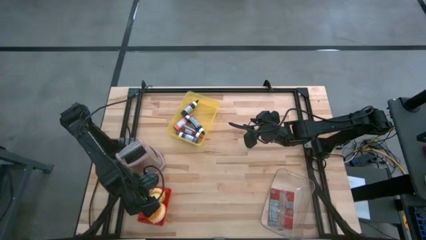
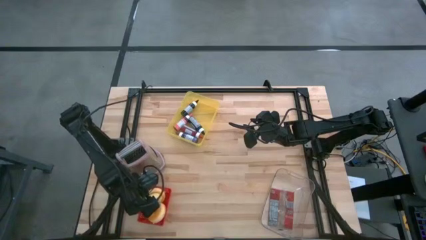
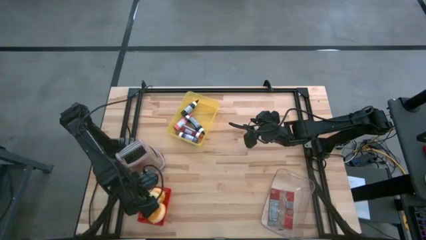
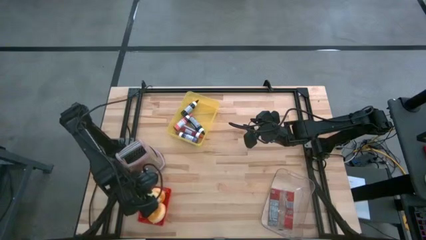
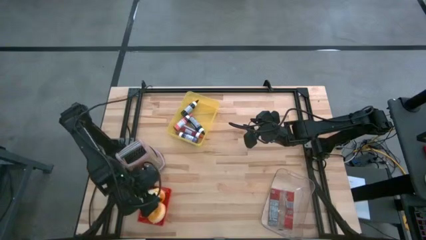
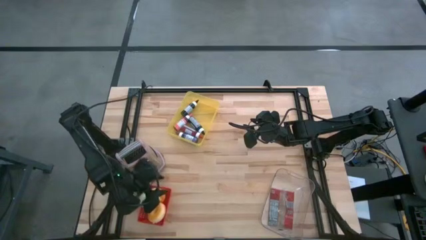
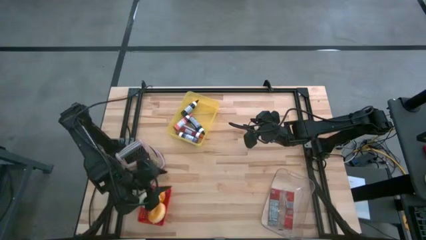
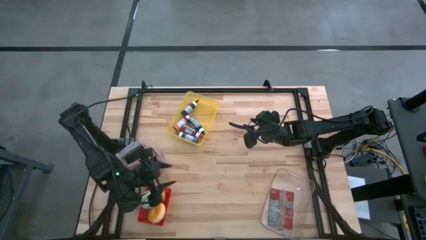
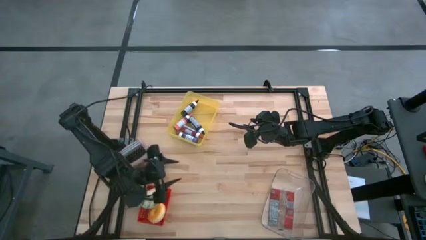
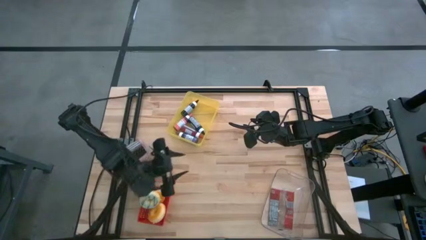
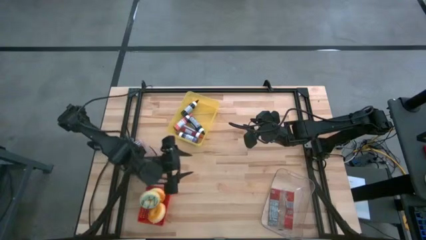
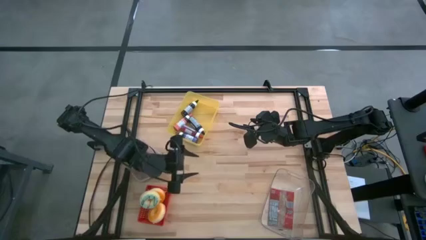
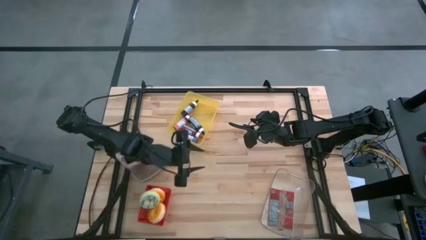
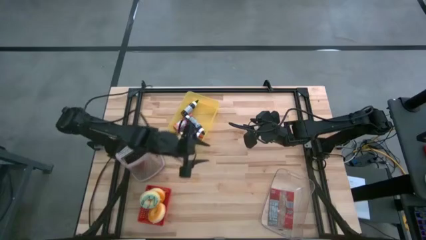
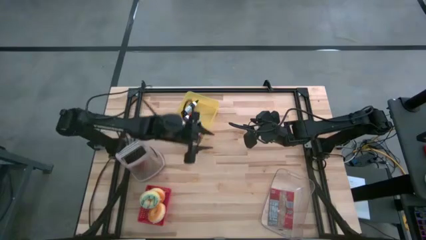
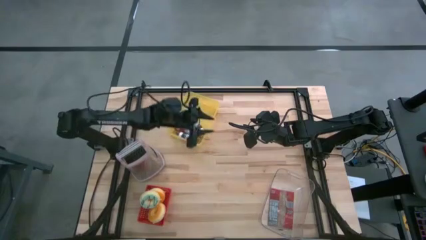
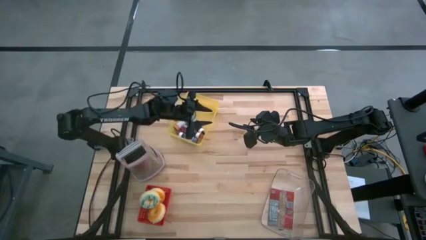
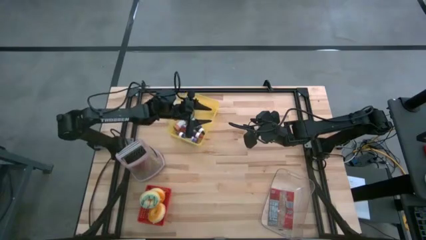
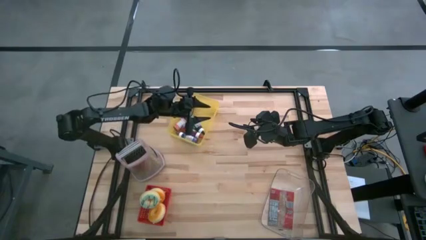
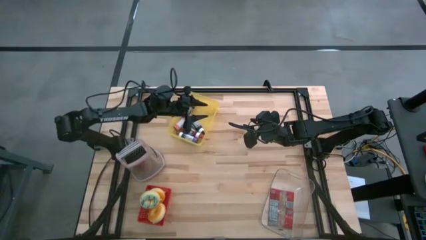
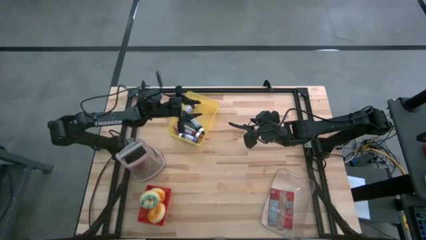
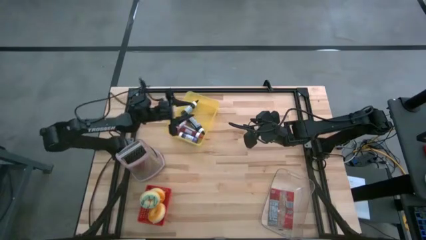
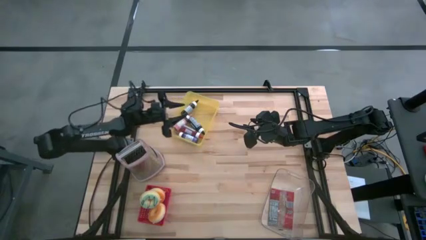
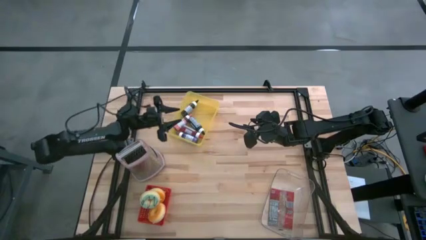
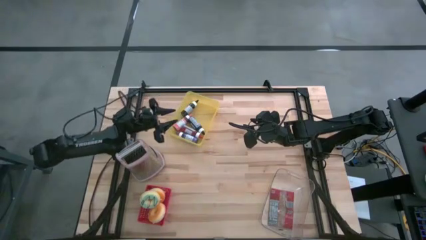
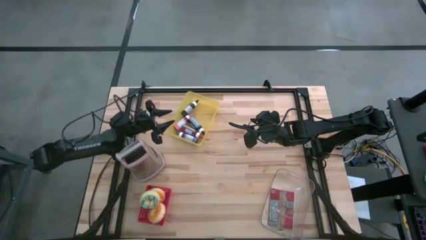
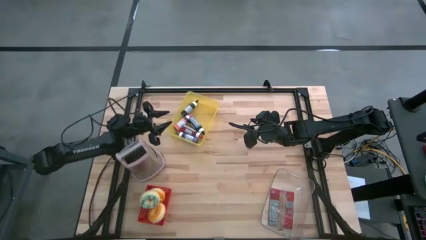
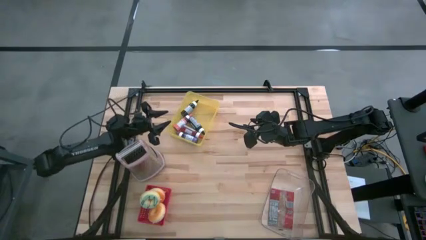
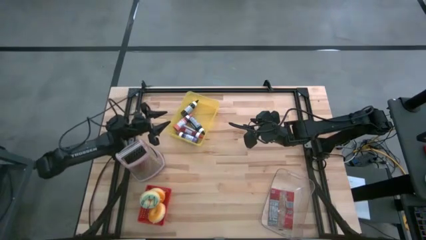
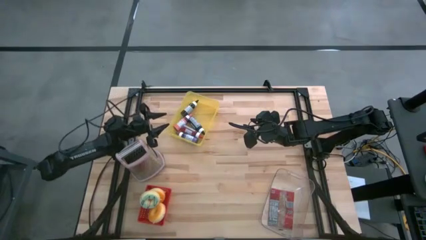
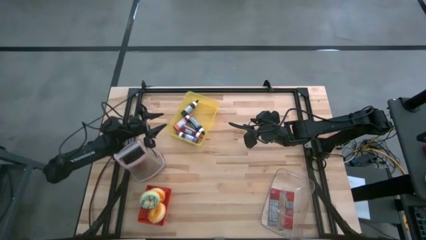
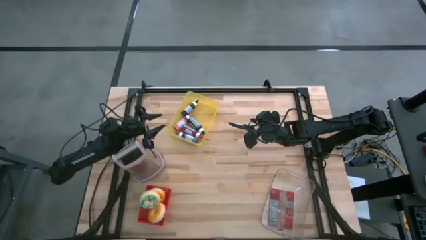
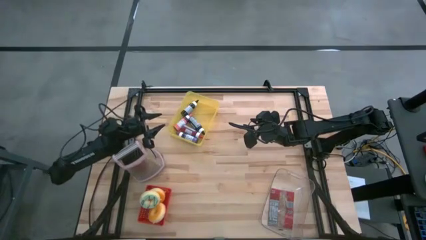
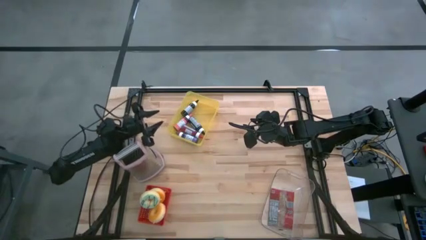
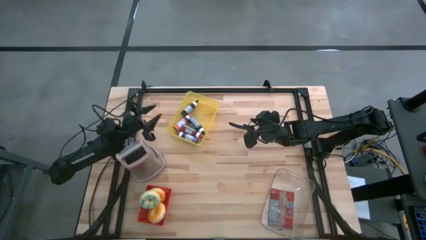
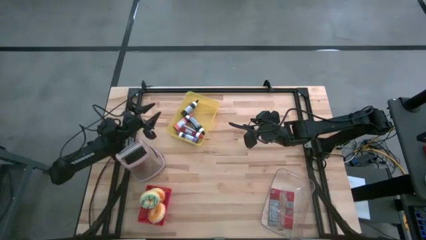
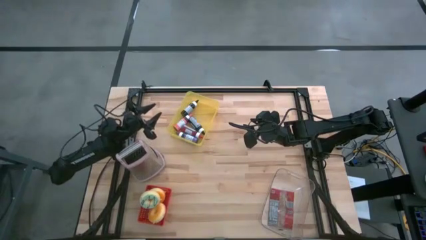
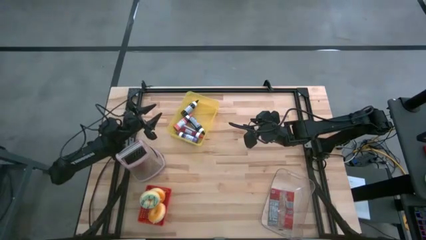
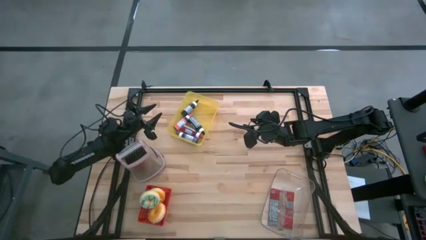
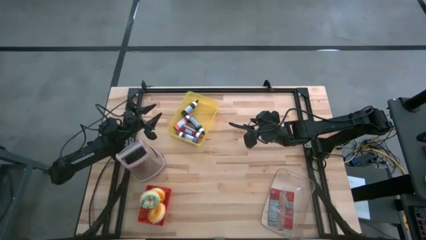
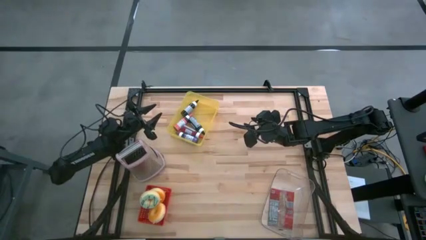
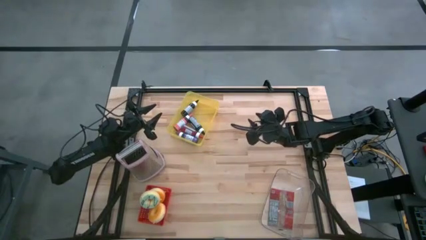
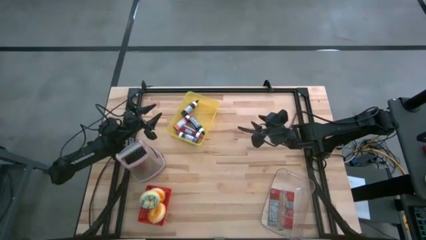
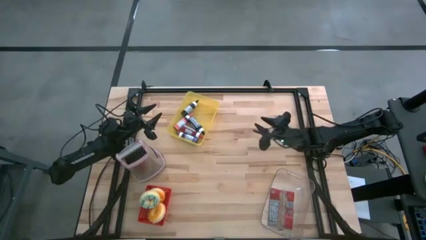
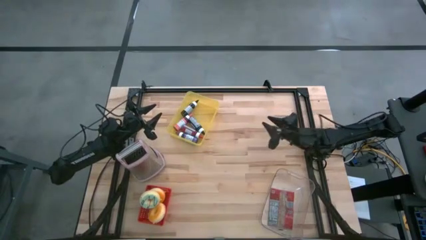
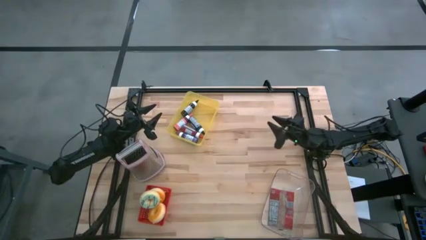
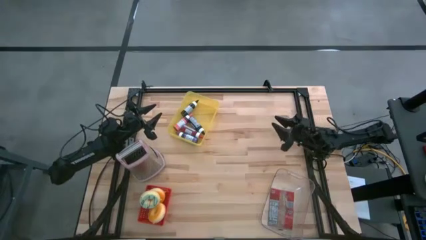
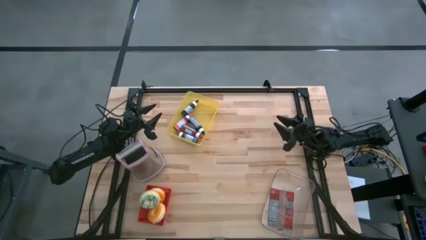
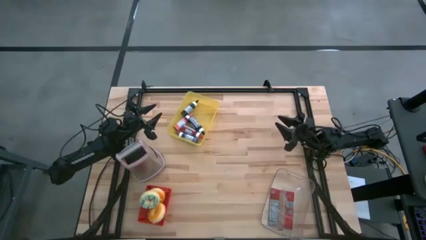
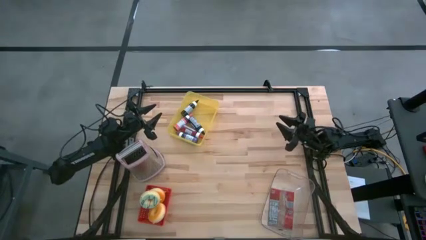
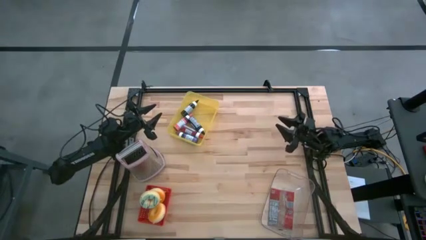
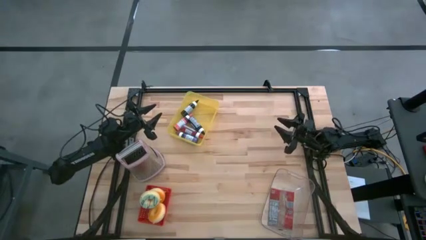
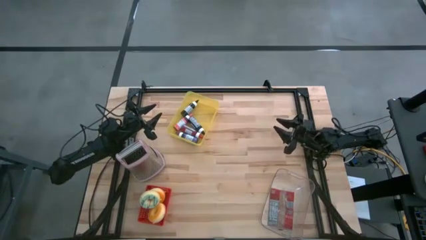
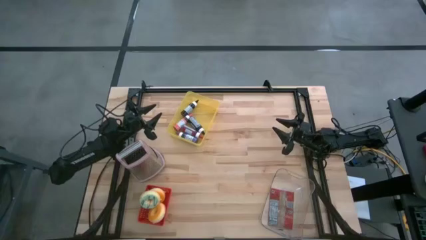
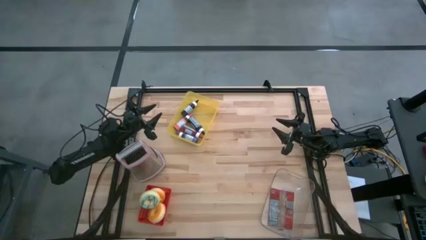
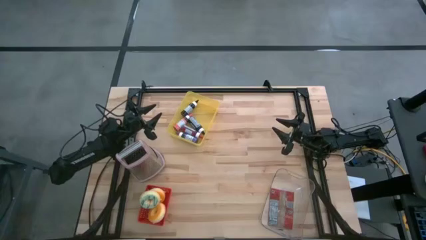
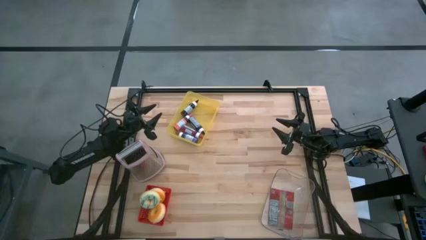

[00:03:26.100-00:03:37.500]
Task: Pick & Place Food Item
Return to Home Position
